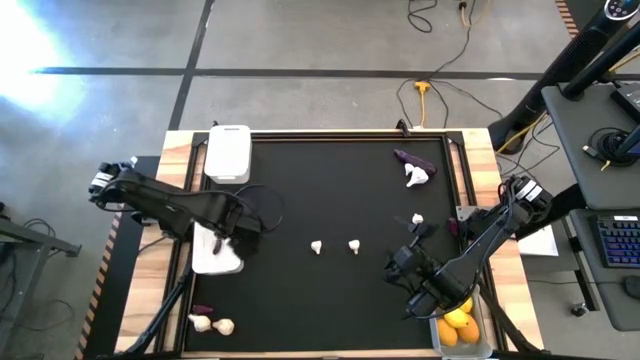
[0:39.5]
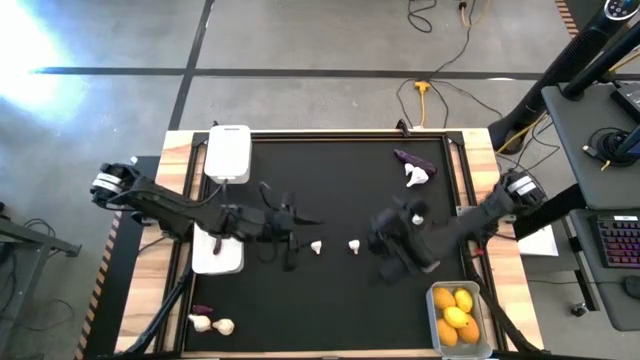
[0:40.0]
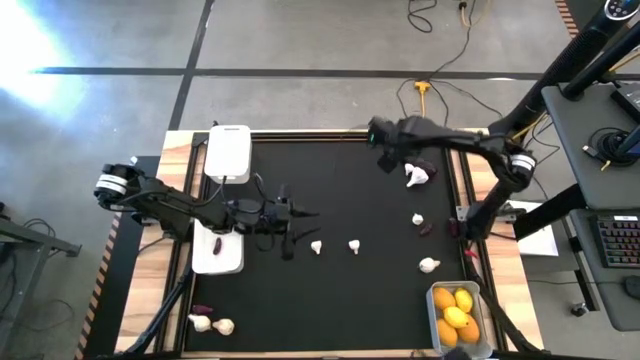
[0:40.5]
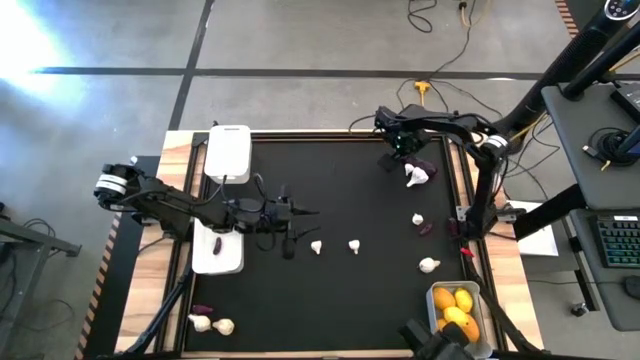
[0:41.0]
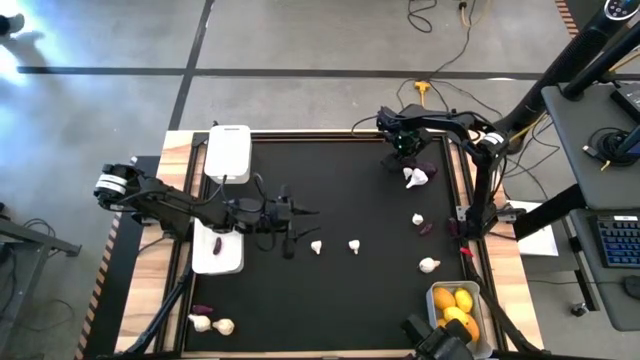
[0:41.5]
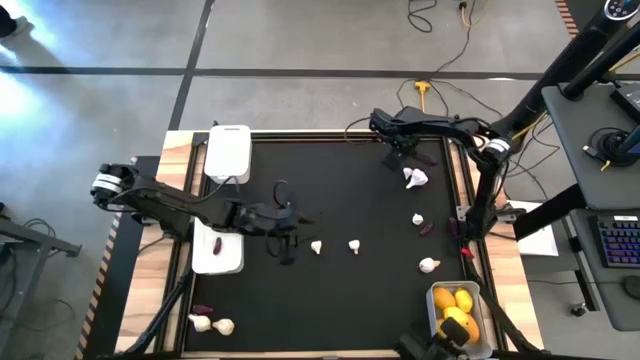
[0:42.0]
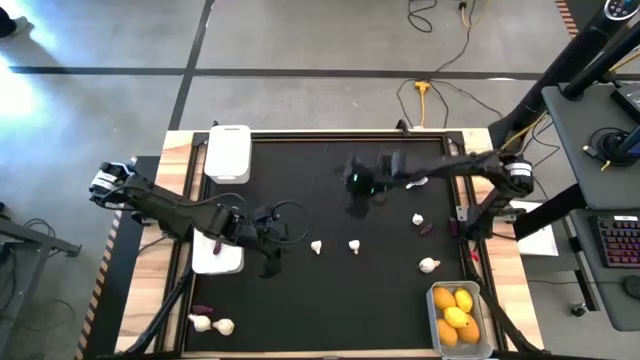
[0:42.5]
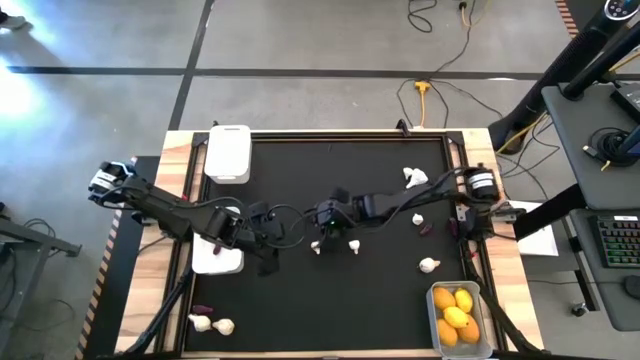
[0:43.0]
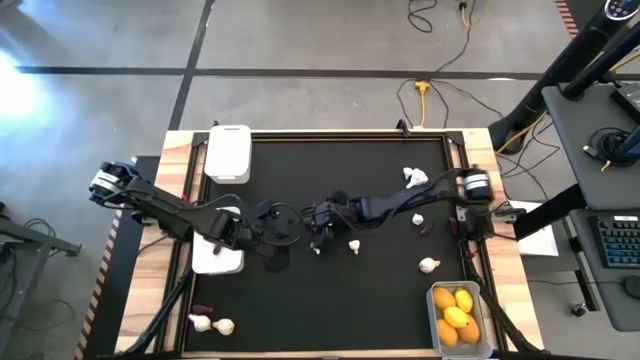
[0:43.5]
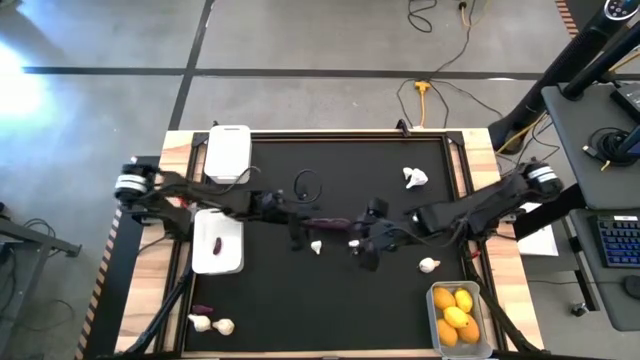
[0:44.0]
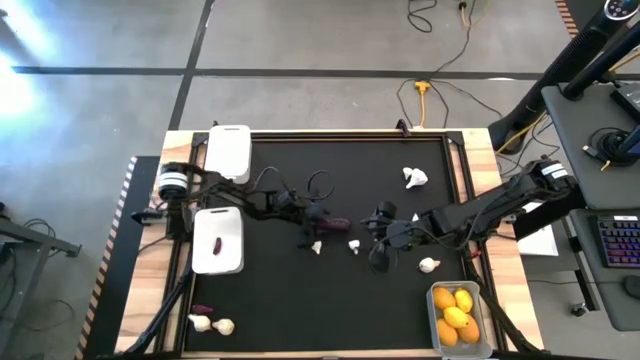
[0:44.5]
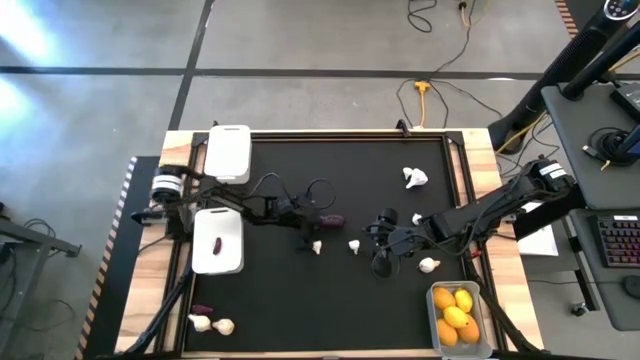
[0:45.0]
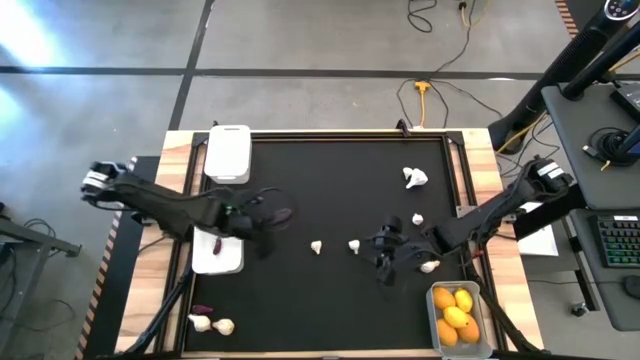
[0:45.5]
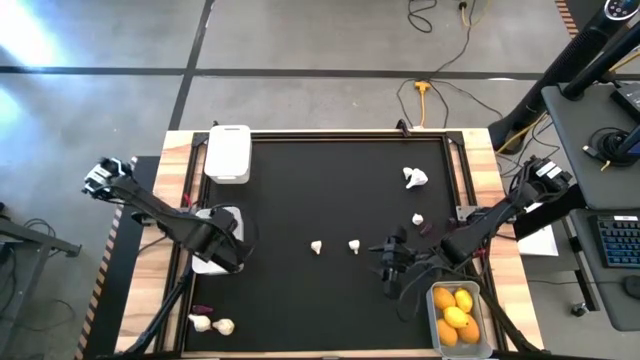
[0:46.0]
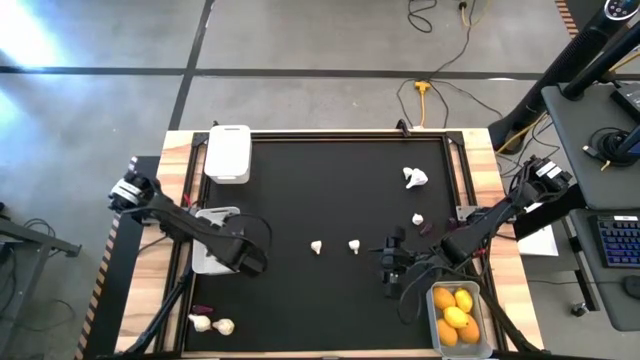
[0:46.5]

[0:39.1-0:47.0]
Task: Sort produce into baskets
Put the eggplant into the bottom white bin

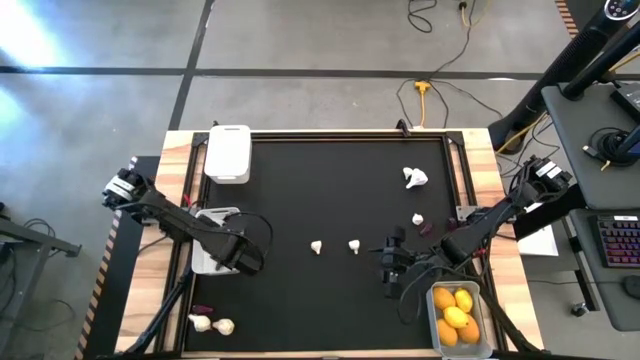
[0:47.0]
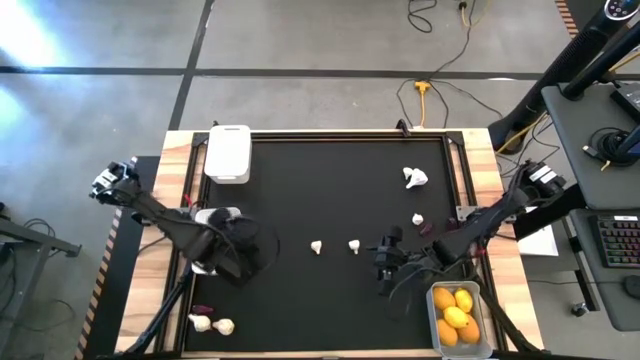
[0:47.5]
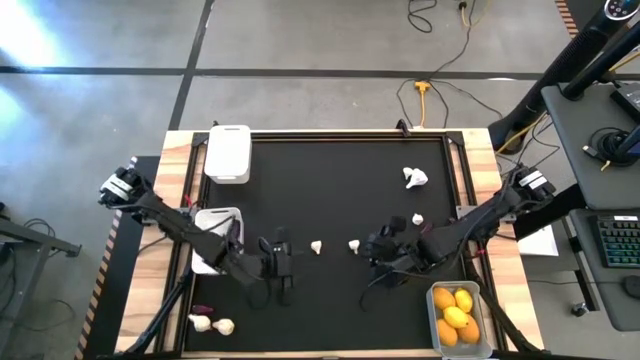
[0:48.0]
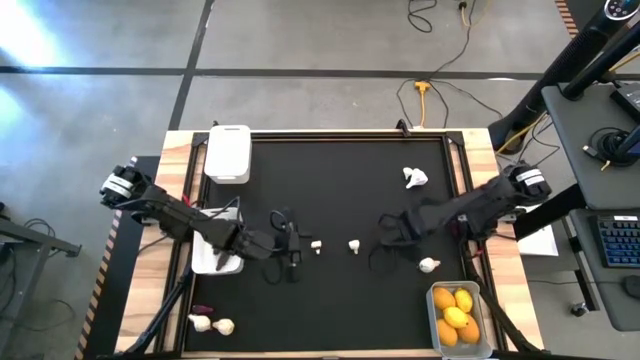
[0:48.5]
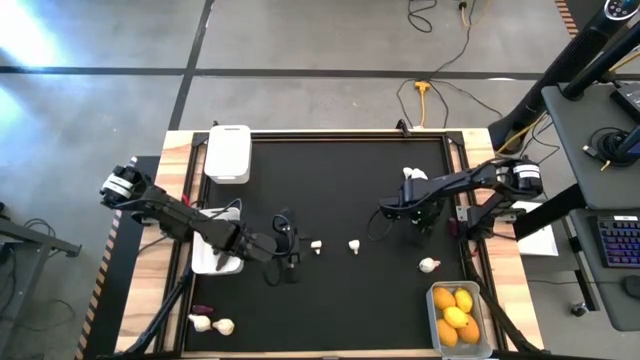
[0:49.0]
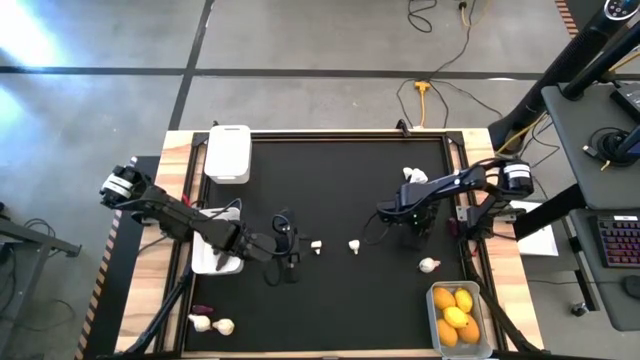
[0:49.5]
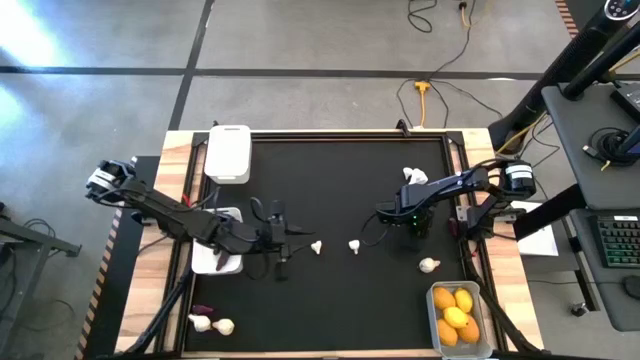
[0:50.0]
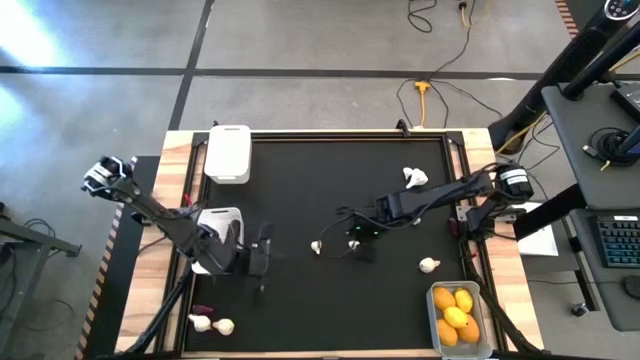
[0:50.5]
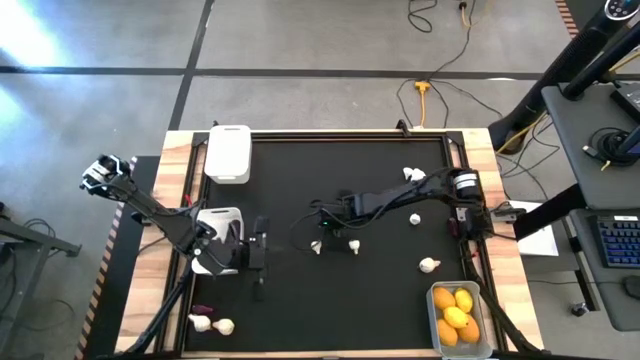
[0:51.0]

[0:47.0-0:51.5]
Move the eggplant to the center

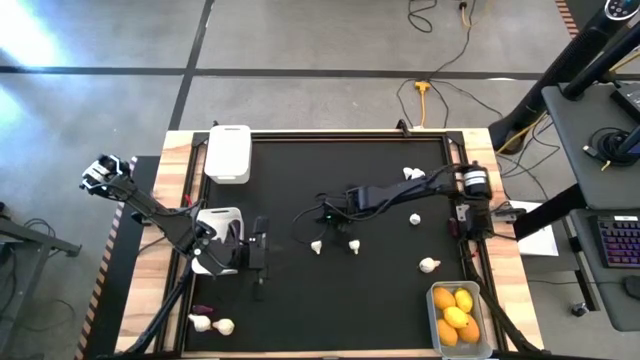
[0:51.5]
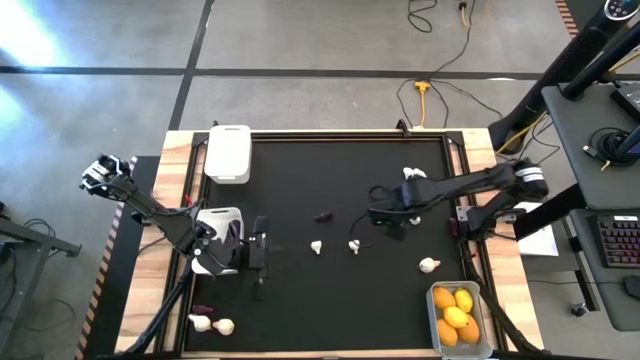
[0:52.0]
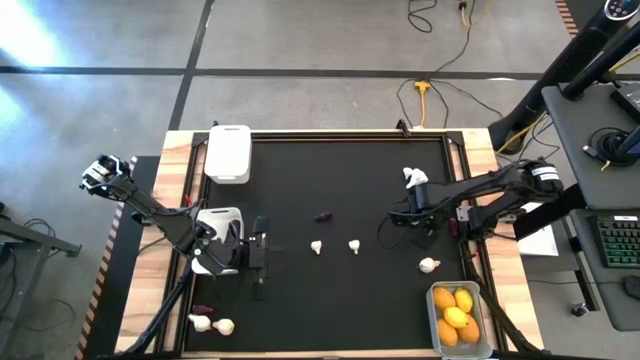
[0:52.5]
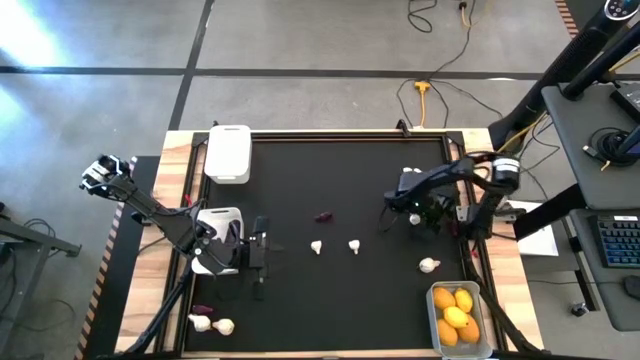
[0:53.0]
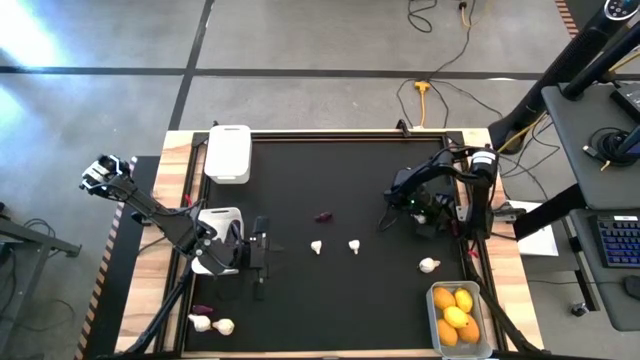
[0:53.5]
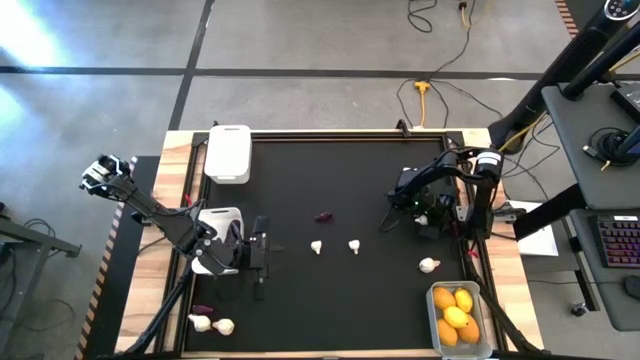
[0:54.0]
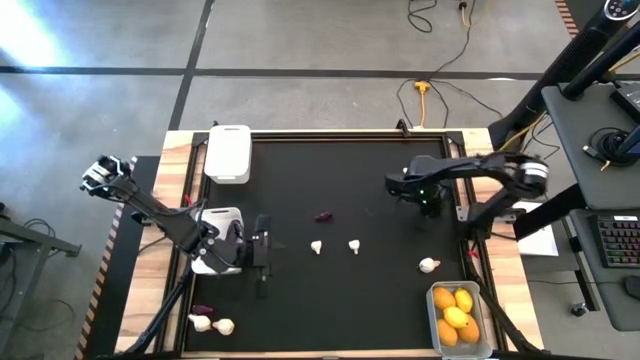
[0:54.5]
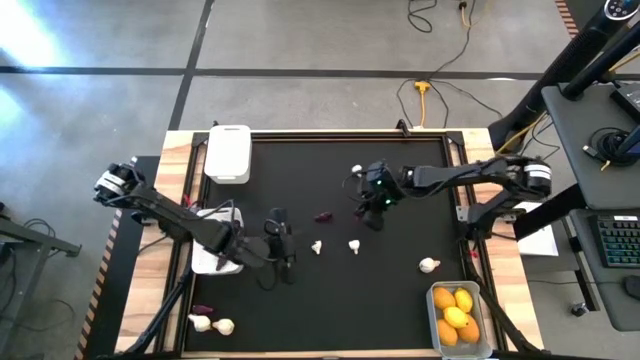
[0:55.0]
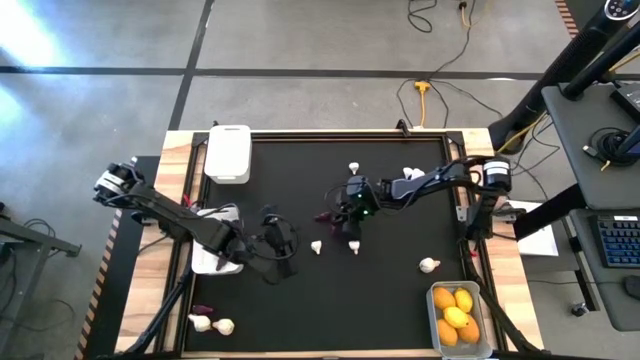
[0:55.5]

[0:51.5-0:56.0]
Move the eggplant to the center

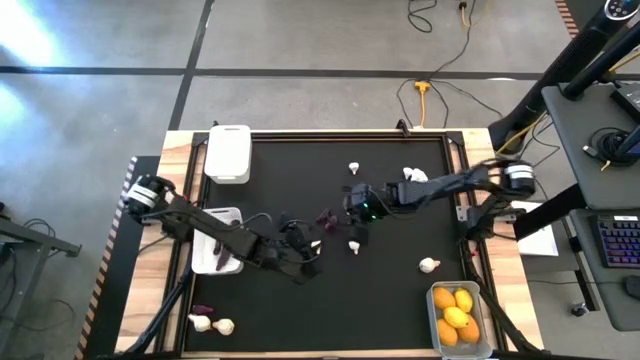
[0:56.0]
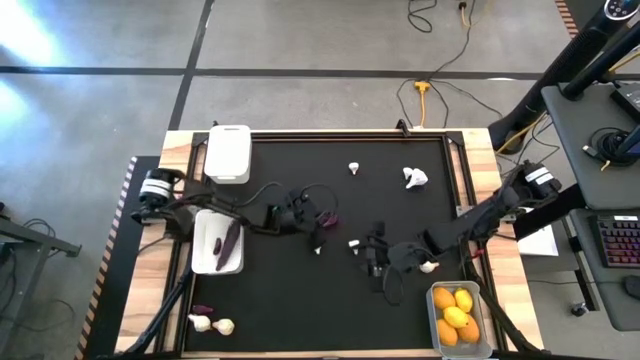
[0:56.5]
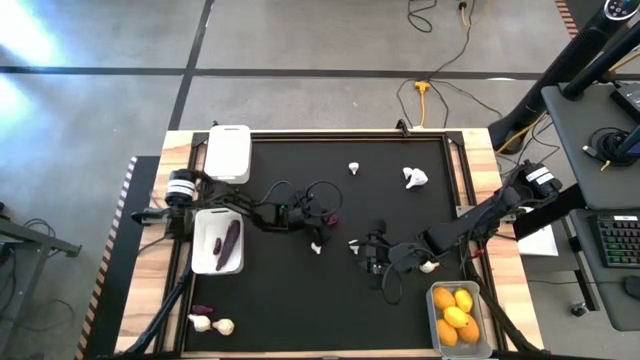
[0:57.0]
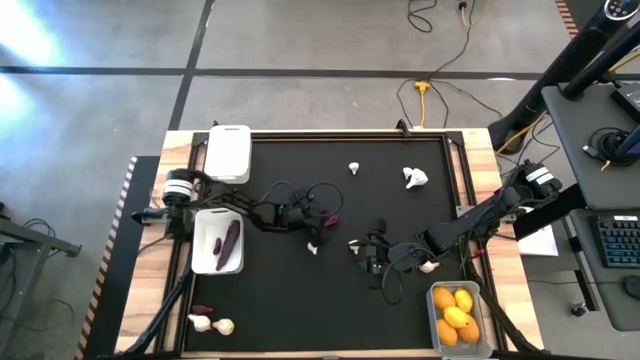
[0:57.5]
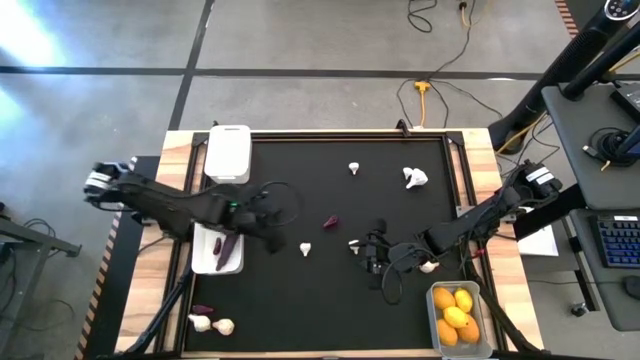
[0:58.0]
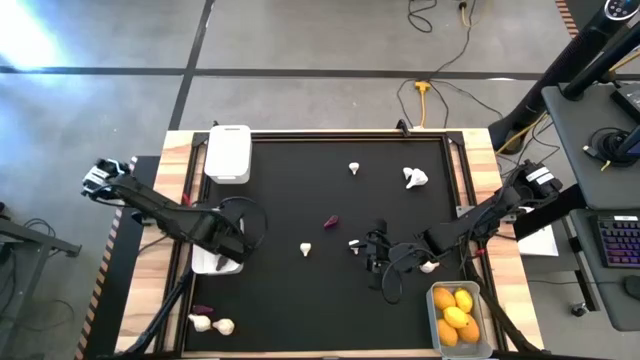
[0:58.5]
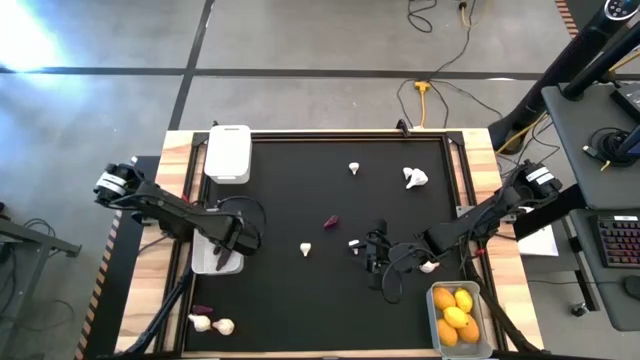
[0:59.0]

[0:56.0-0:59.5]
Put the eggplant into the bottom white bin

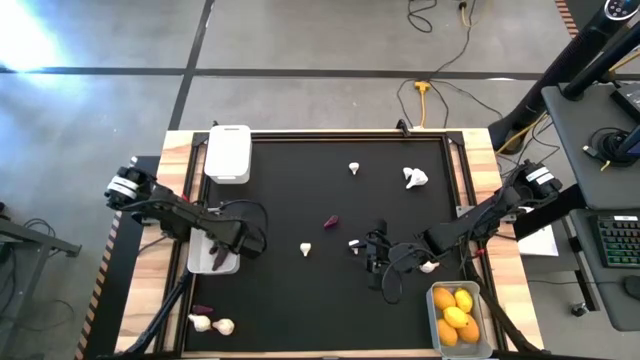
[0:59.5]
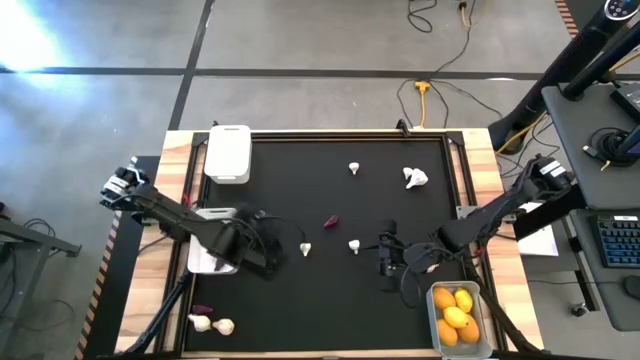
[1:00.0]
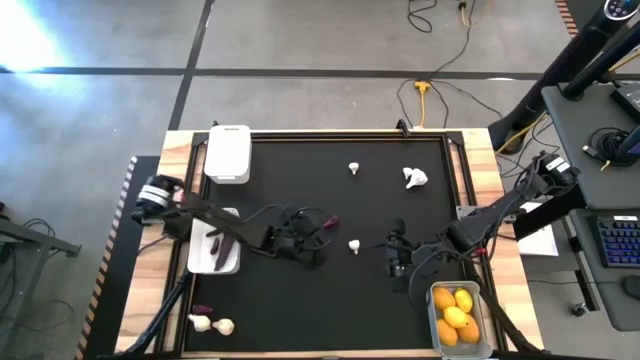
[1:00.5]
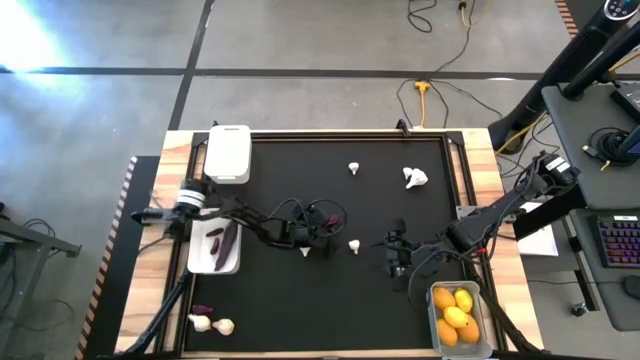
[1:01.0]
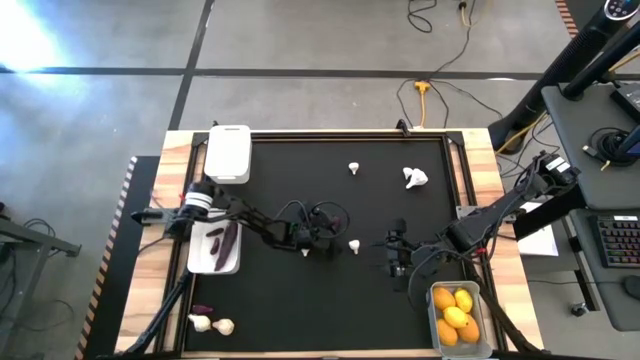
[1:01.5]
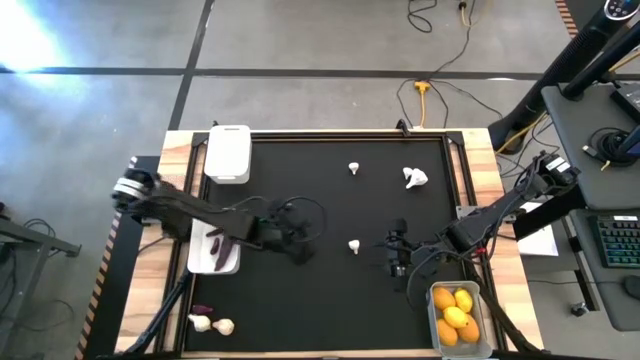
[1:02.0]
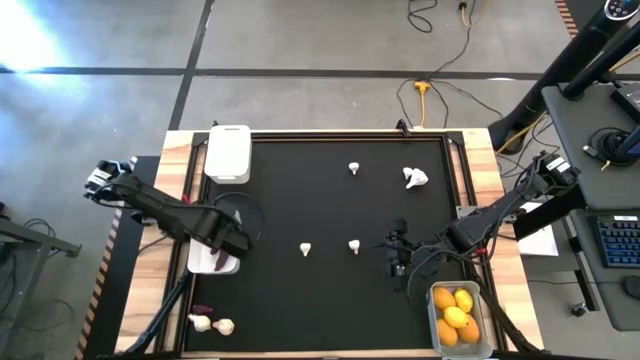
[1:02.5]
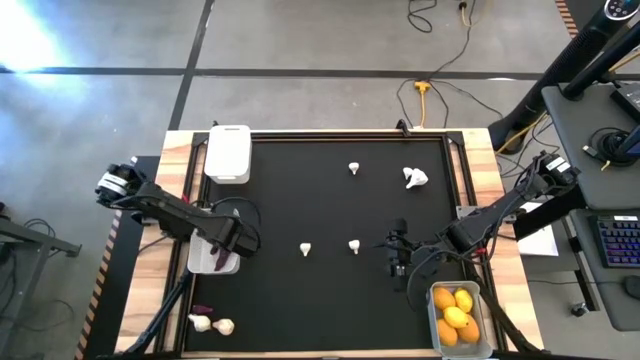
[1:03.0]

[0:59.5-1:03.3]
Put the eggplant into the bottom white bin
